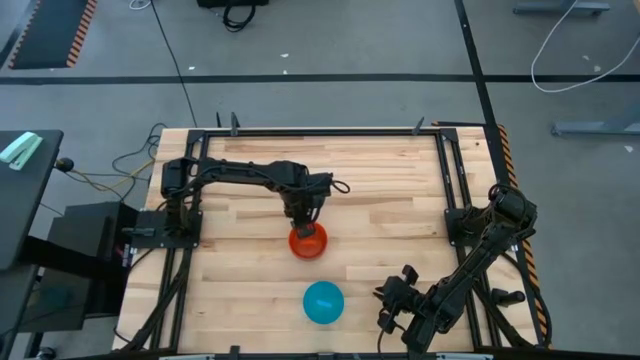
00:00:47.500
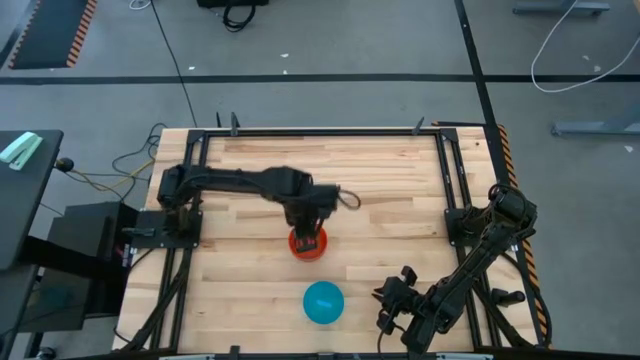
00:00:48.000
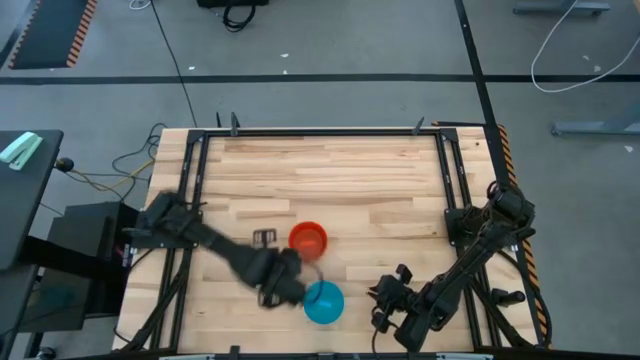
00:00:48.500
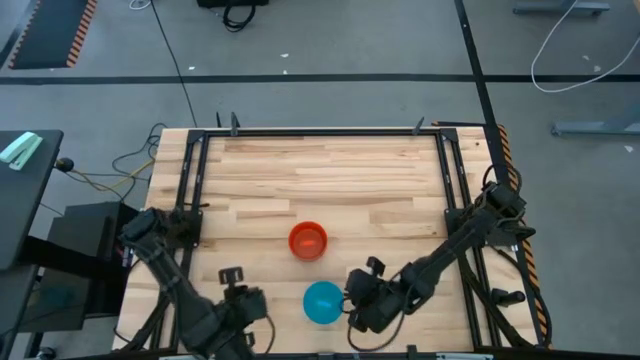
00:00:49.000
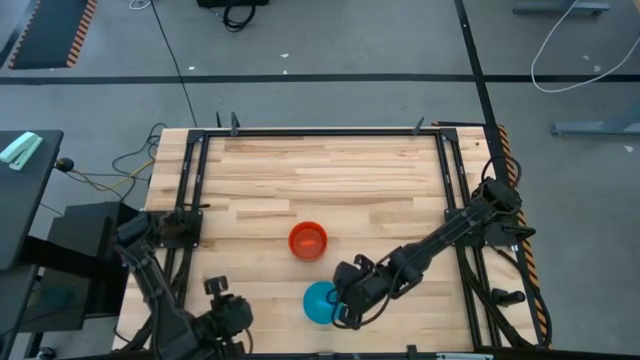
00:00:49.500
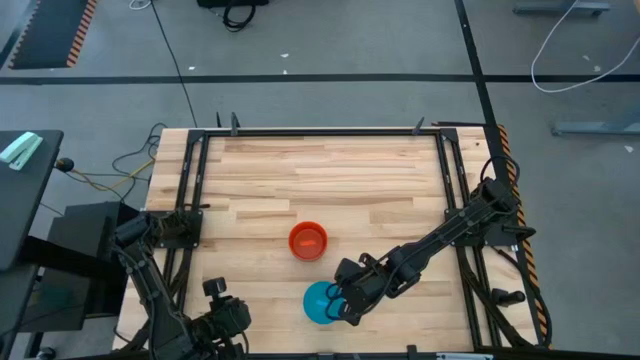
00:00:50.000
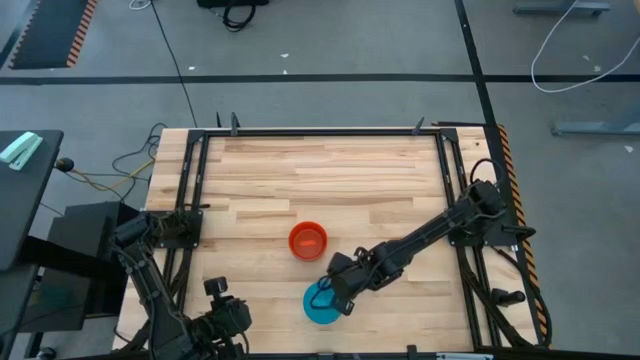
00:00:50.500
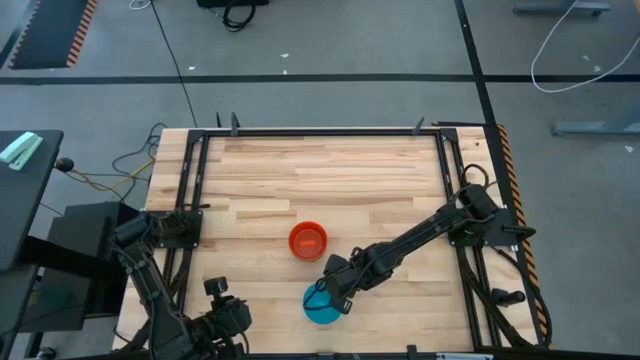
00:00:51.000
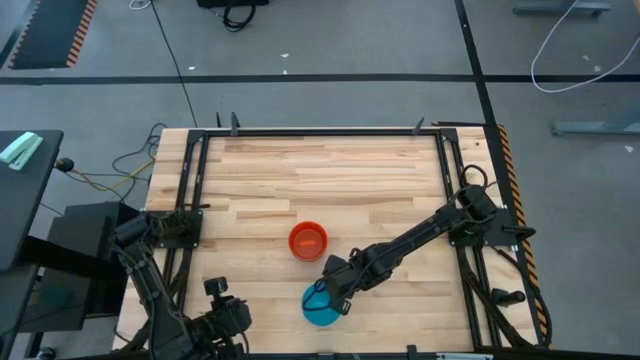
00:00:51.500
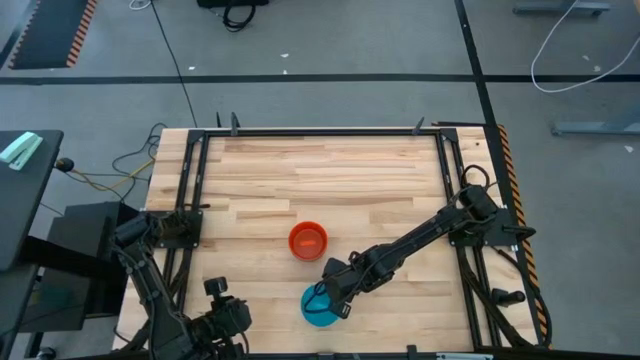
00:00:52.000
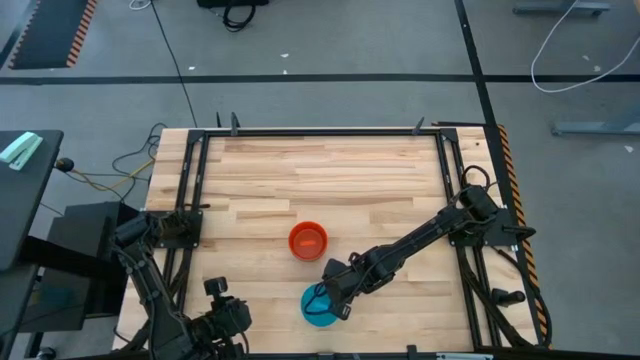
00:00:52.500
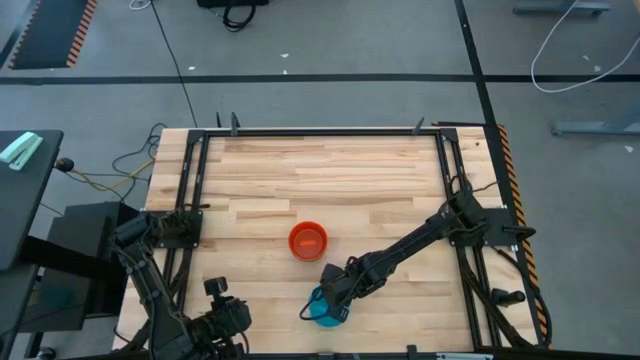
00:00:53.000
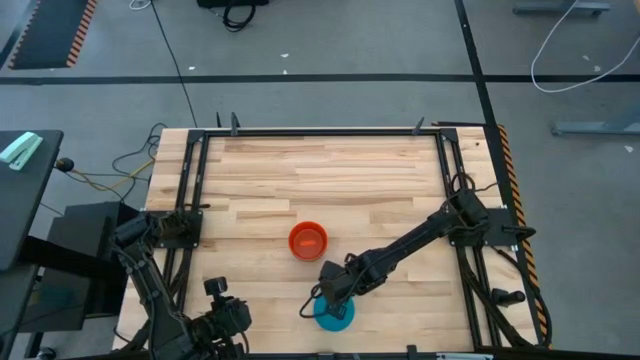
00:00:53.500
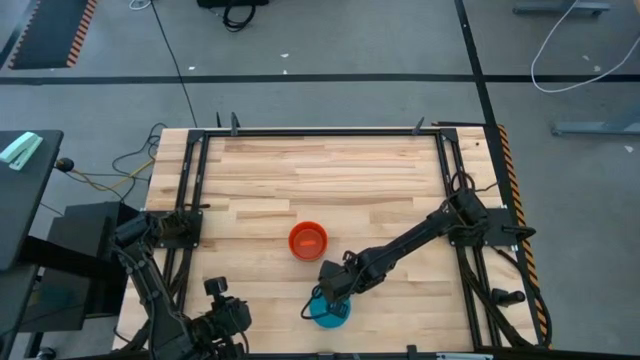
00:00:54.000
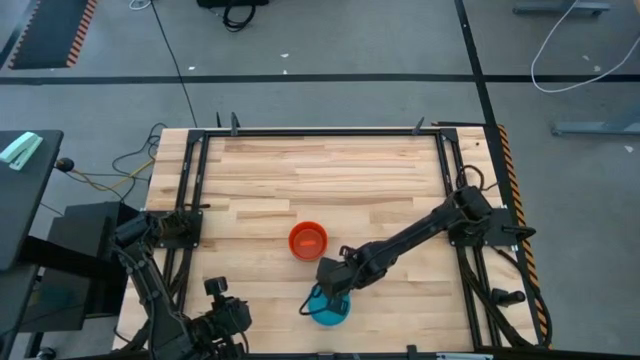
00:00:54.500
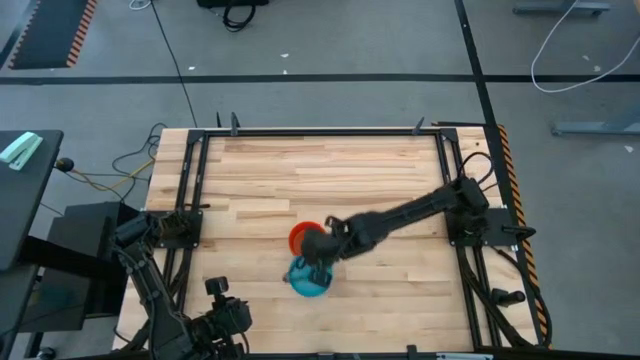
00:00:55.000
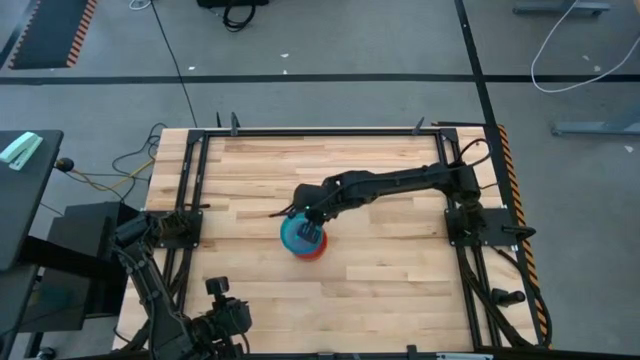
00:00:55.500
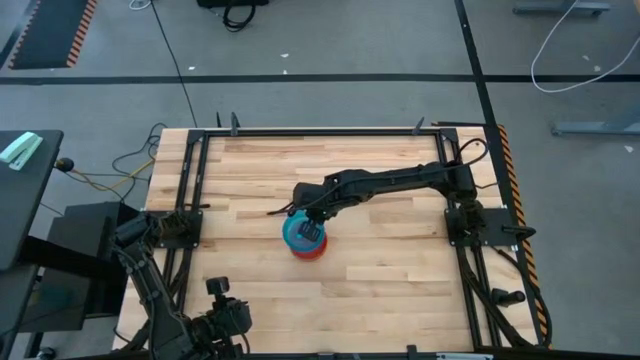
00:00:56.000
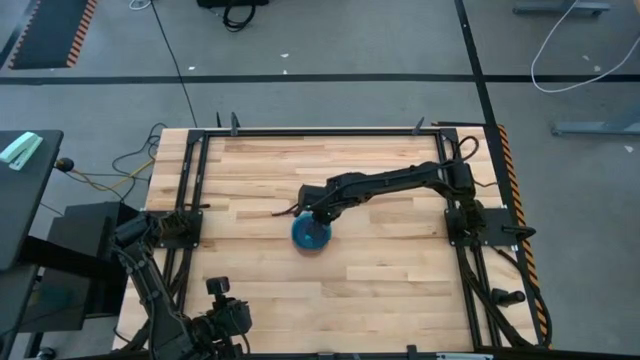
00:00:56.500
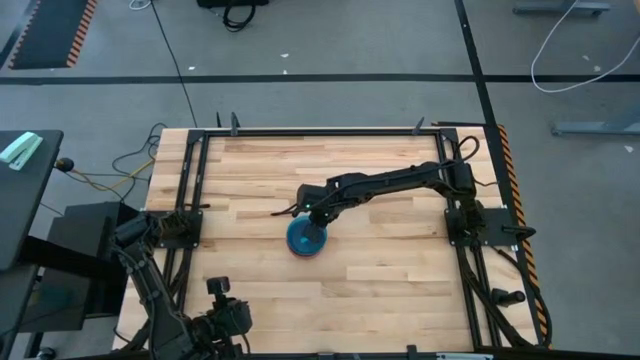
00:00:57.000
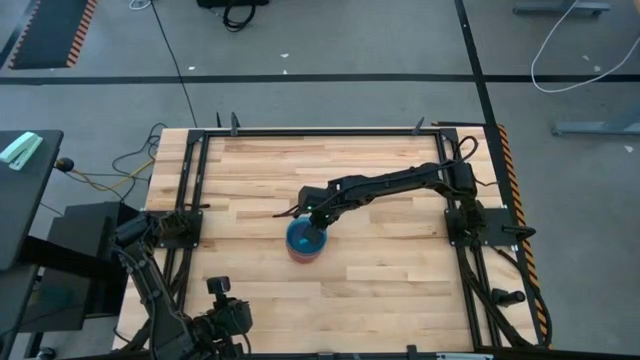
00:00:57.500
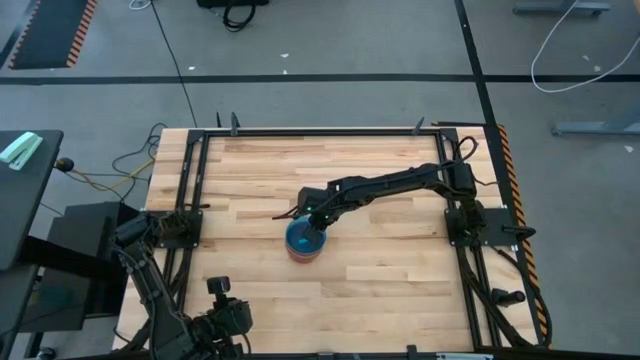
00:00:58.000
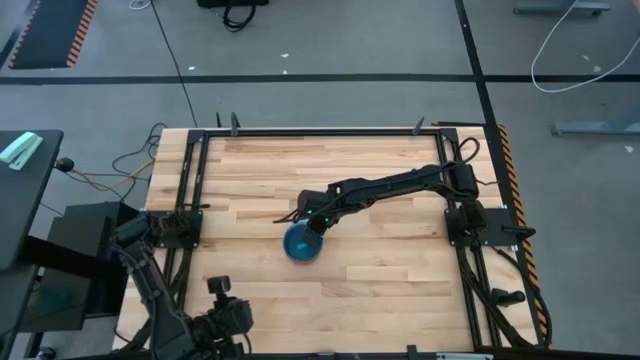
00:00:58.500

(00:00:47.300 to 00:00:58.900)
Task: Nest bowls inside each other
Stack the blue bowl on top of the orange bowl

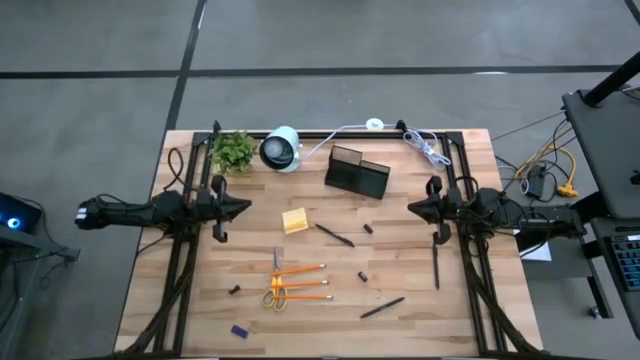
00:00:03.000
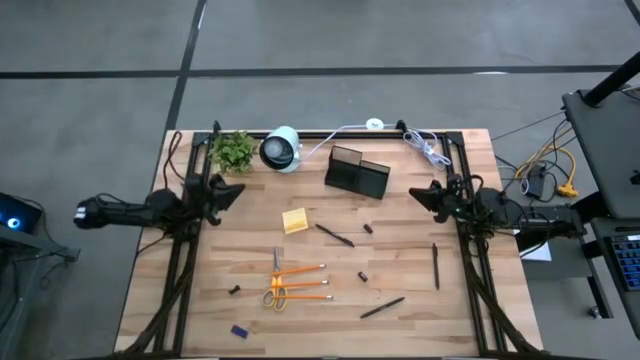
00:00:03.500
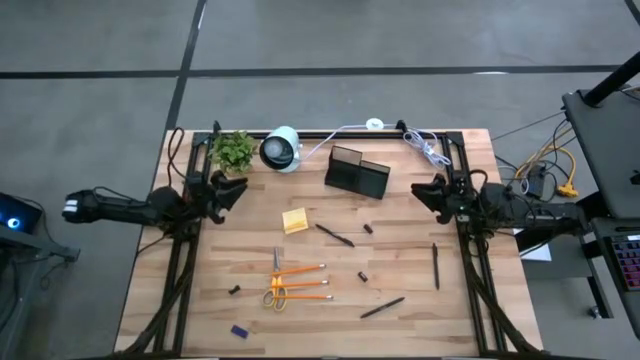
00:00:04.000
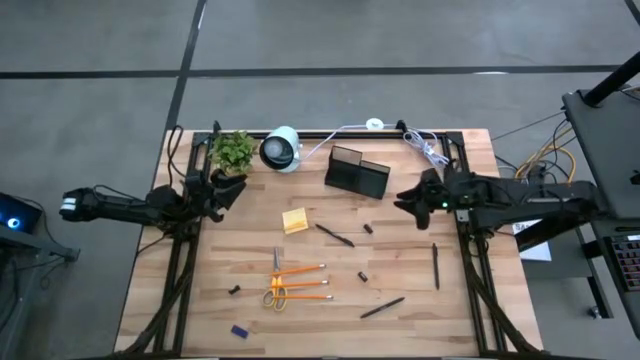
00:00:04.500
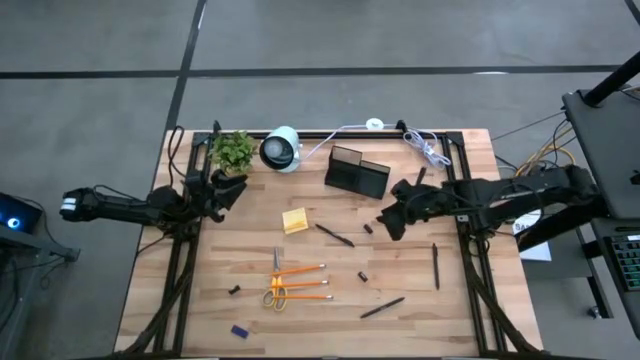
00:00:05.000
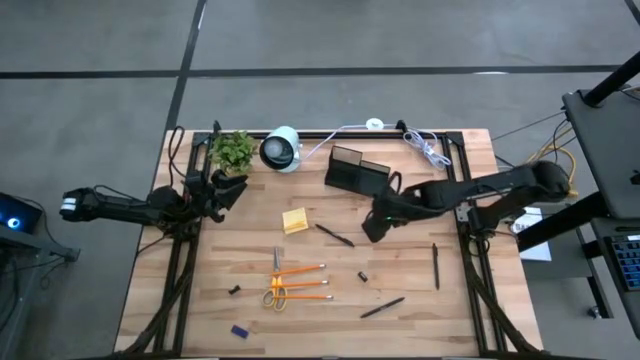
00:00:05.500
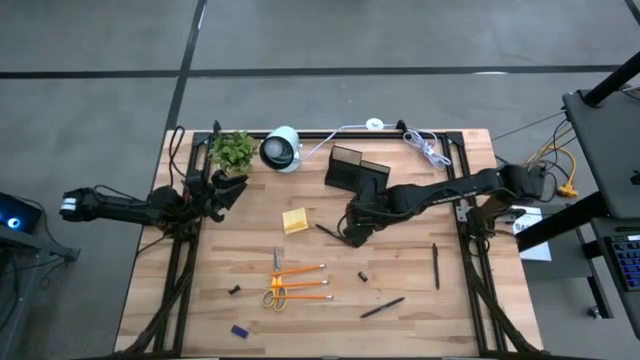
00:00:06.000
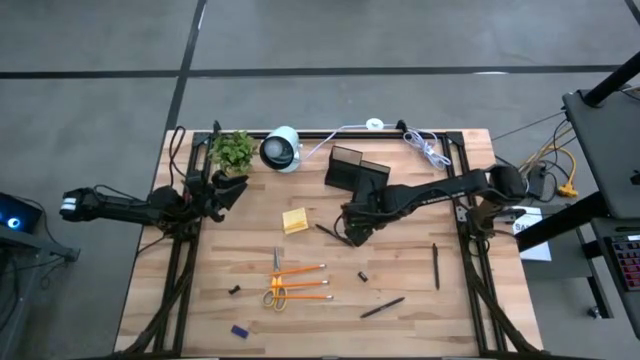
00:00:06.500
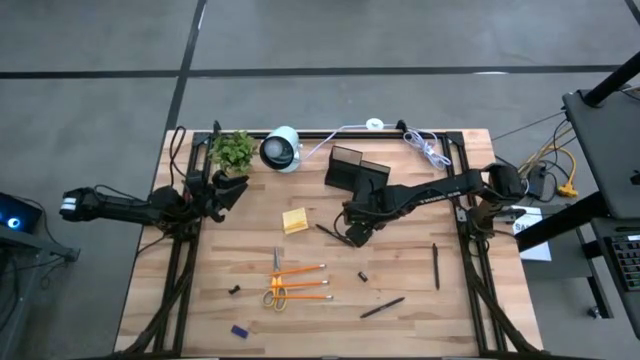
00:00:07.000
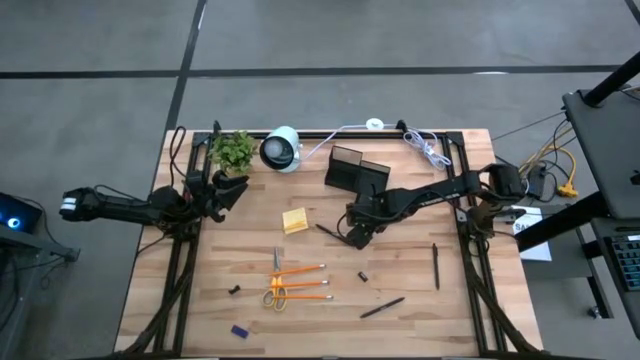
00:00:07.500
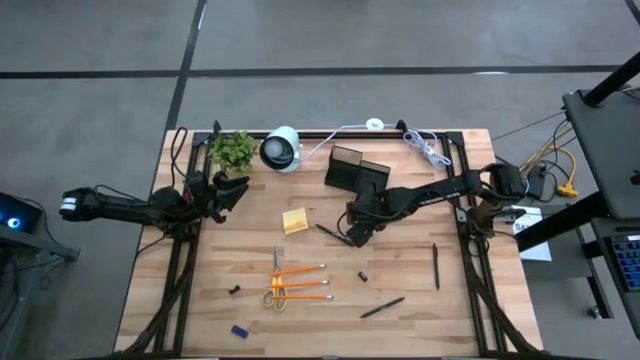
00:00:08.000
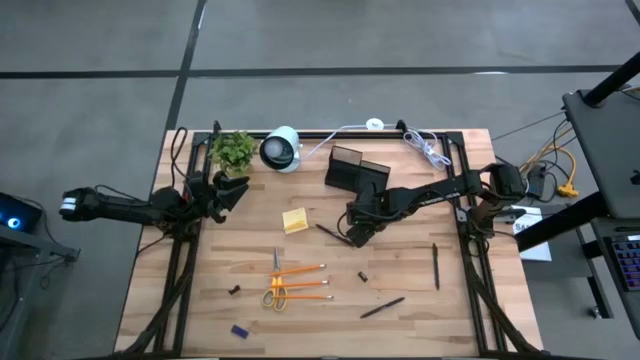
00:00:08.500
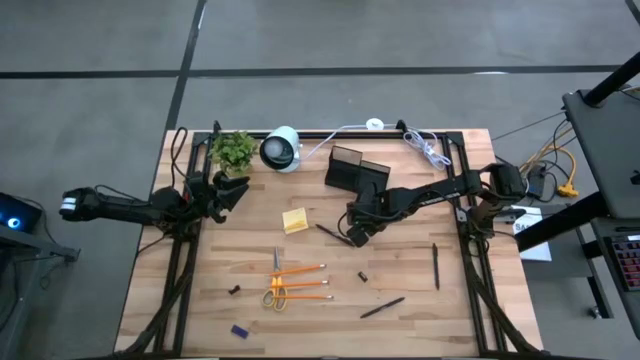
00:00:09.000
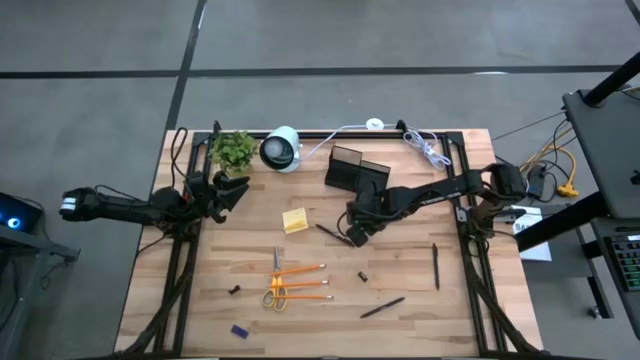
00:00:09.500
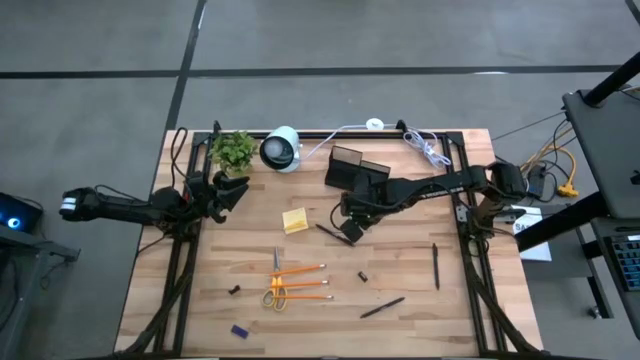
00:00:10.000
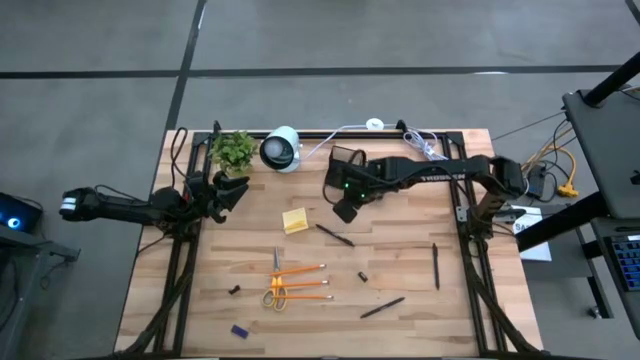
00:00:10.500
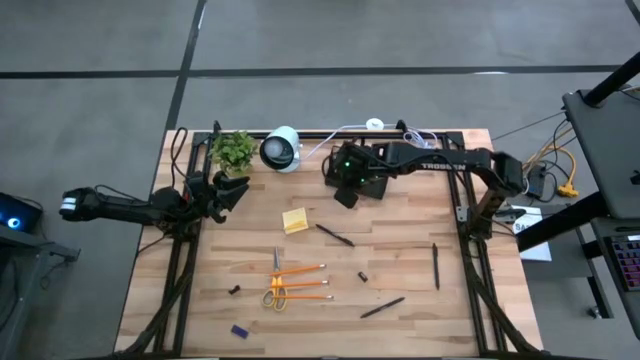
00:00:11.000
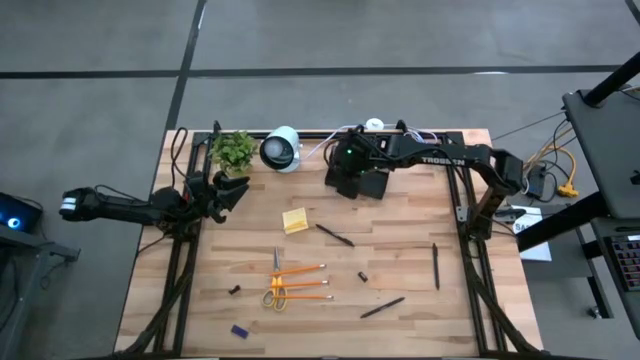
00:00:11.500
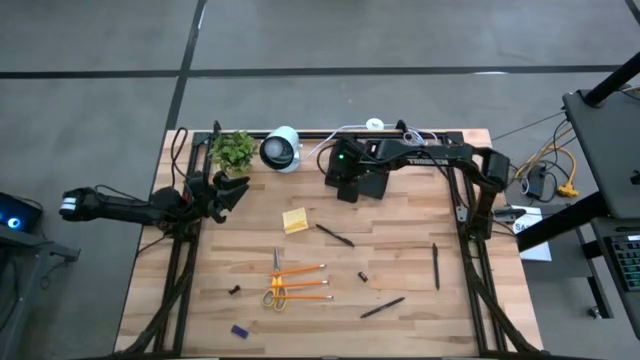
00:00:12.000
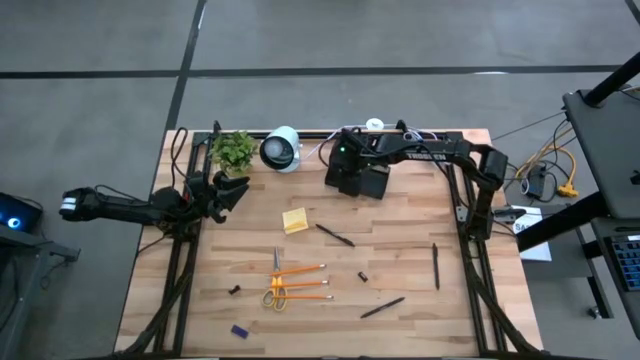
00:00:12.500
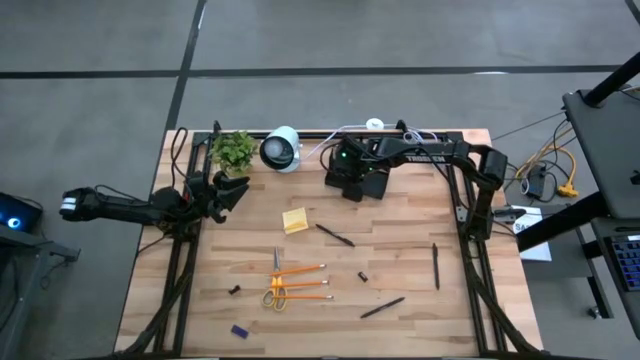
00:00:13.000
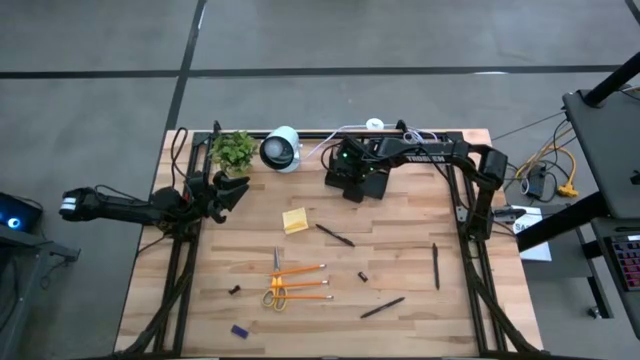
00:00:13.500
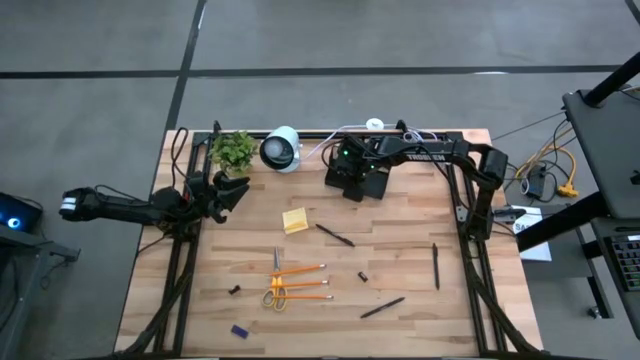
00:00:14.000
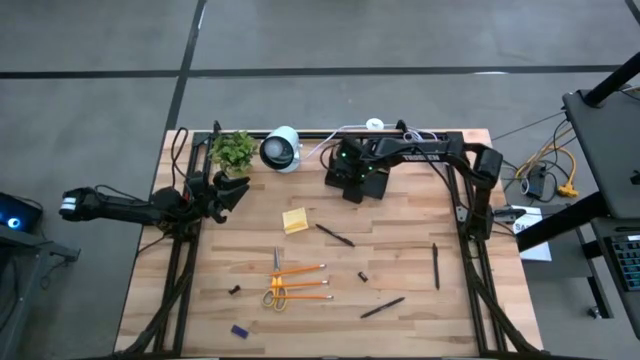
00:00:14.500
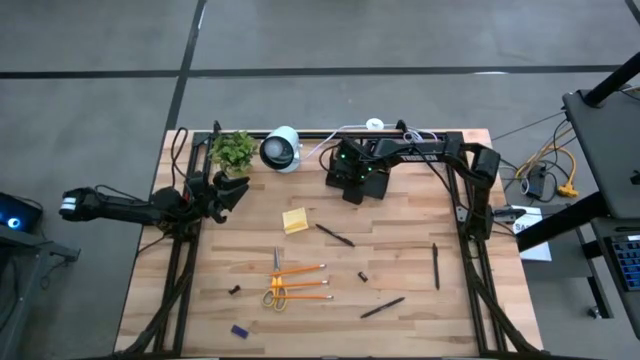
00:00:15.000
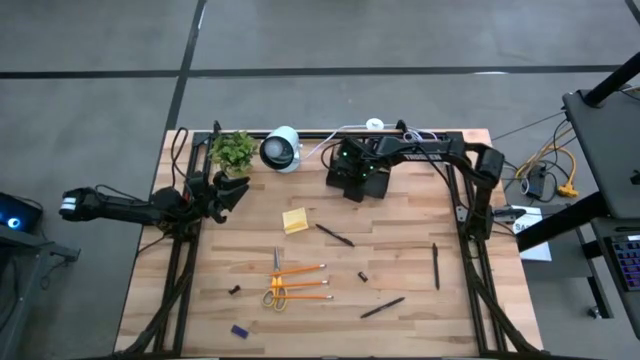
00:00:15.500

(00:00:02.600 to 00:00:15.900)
Task: Pick and place office supplies into organizer
Put the top right binder clip into the desk organizer
